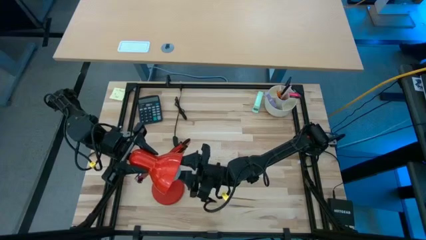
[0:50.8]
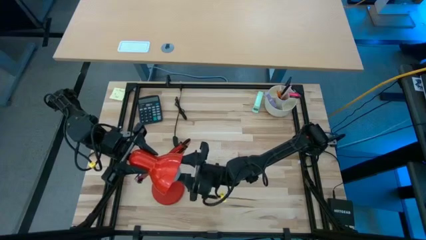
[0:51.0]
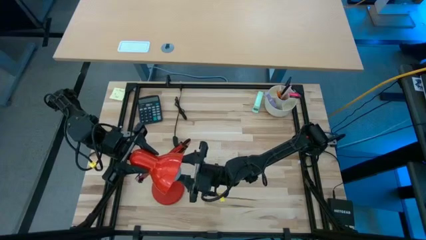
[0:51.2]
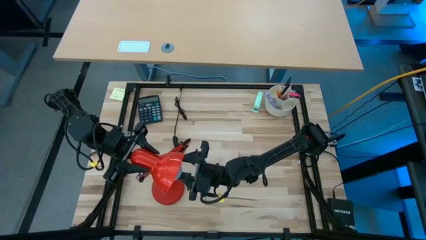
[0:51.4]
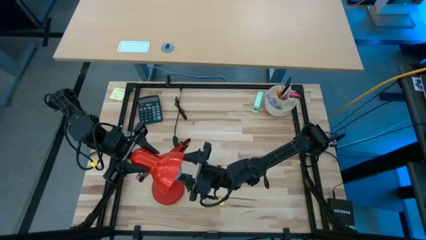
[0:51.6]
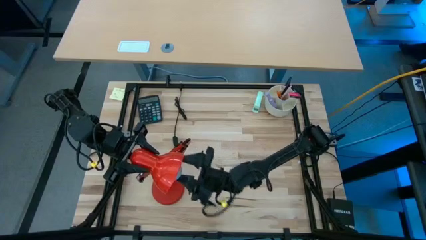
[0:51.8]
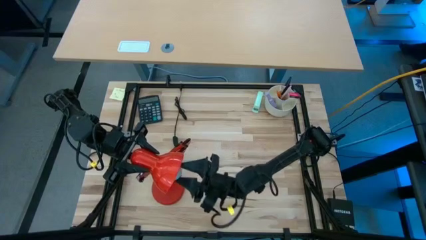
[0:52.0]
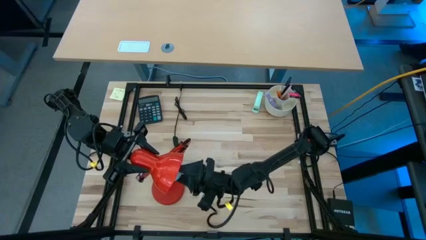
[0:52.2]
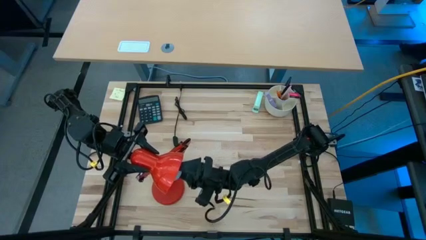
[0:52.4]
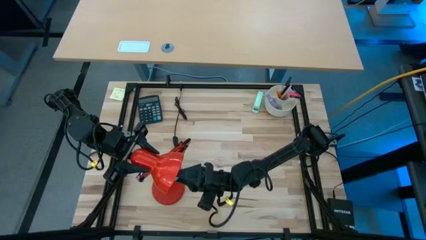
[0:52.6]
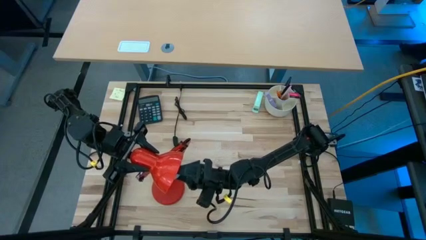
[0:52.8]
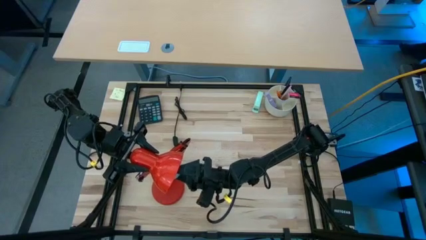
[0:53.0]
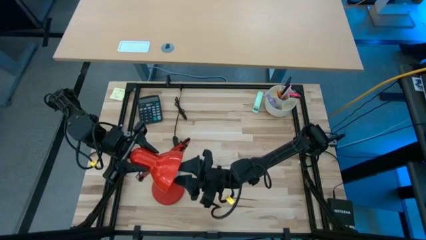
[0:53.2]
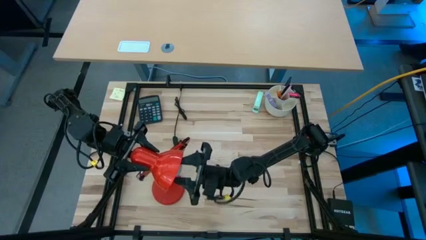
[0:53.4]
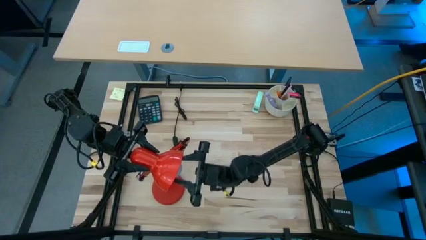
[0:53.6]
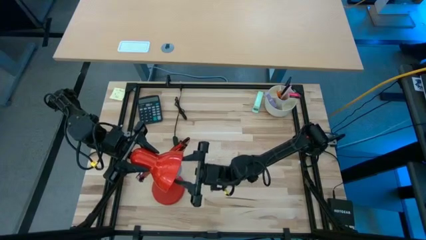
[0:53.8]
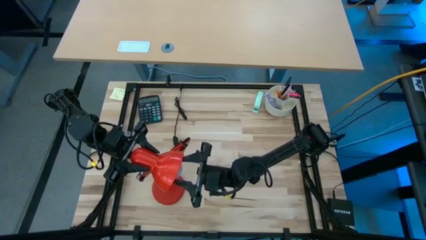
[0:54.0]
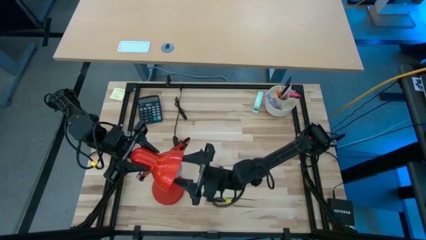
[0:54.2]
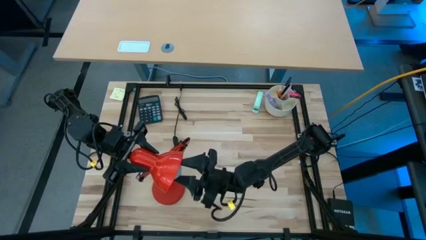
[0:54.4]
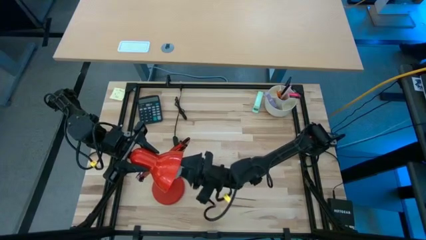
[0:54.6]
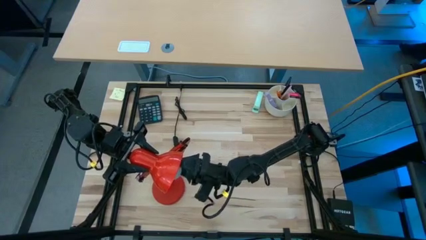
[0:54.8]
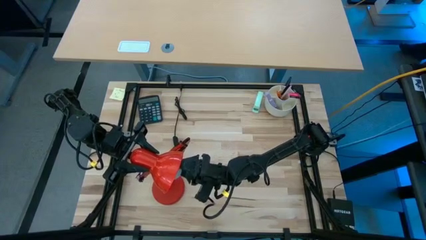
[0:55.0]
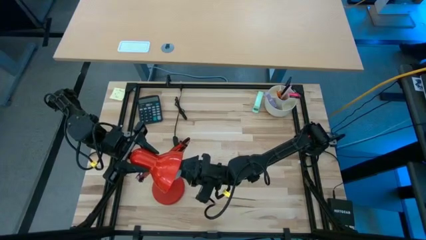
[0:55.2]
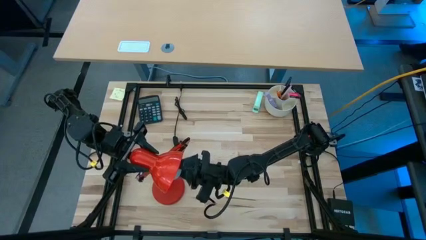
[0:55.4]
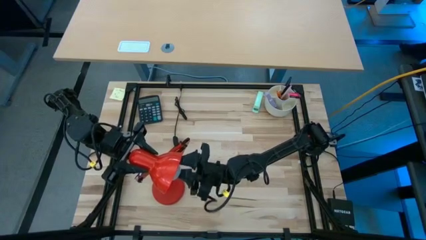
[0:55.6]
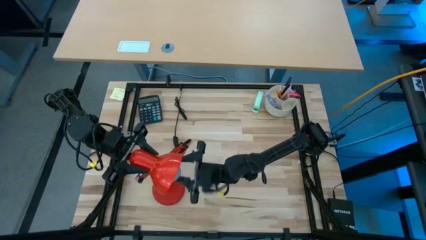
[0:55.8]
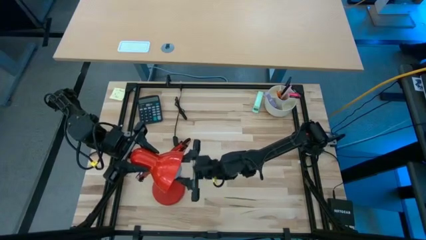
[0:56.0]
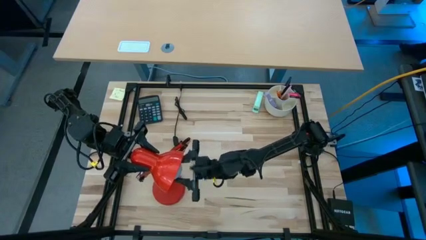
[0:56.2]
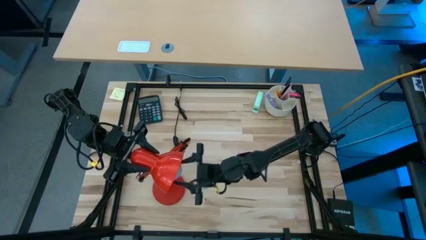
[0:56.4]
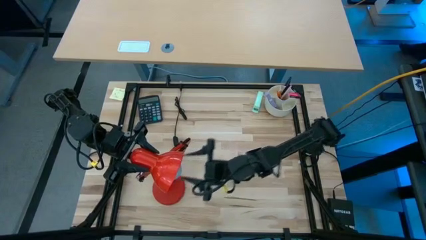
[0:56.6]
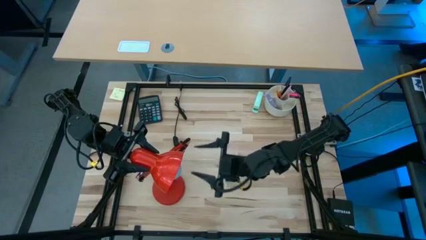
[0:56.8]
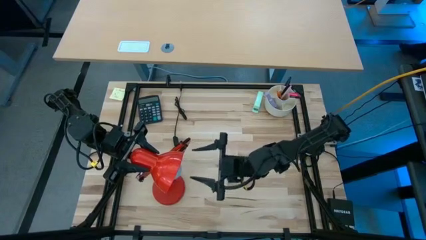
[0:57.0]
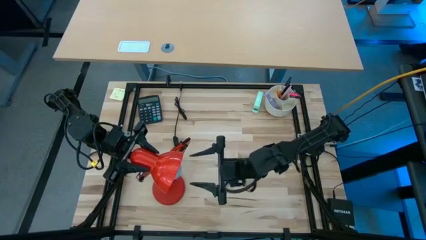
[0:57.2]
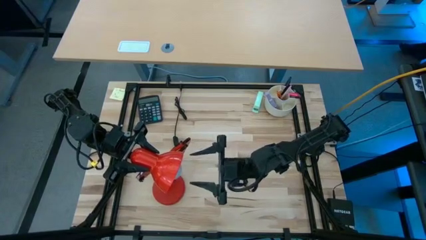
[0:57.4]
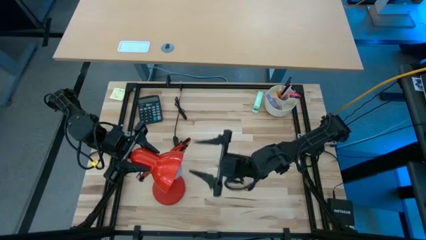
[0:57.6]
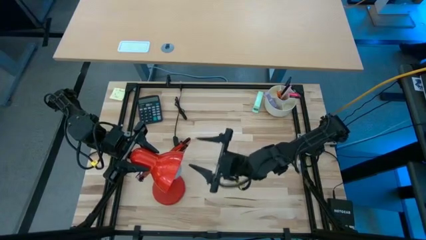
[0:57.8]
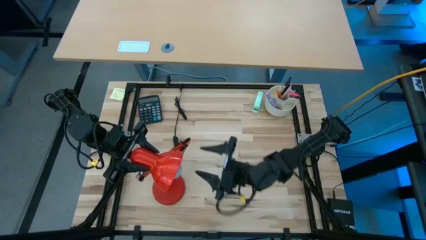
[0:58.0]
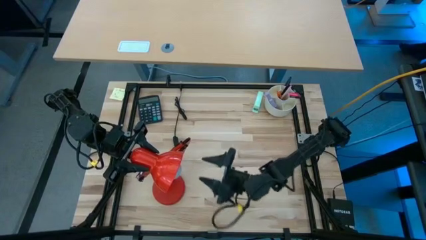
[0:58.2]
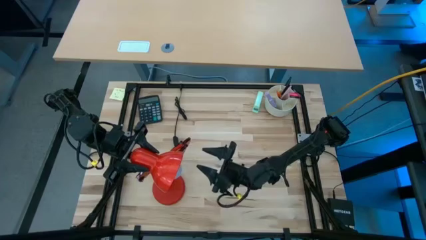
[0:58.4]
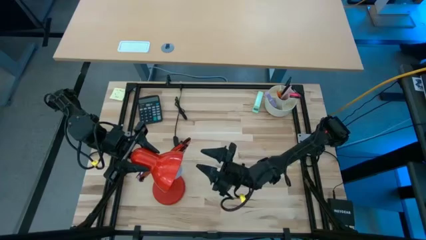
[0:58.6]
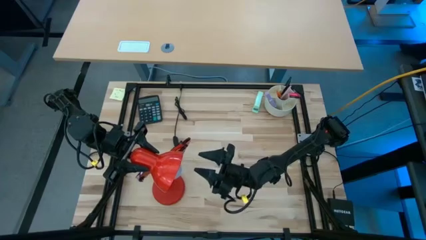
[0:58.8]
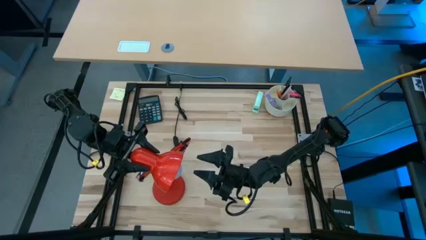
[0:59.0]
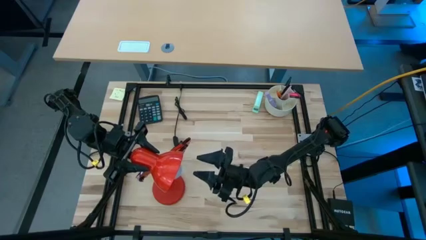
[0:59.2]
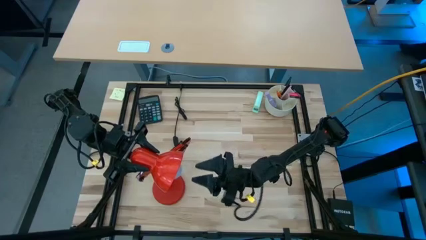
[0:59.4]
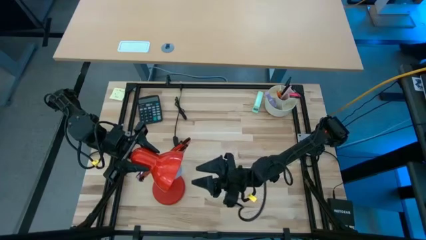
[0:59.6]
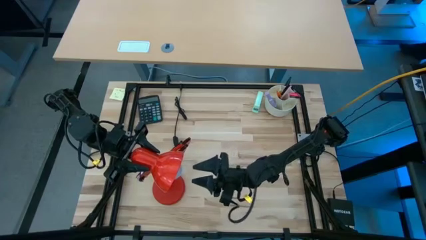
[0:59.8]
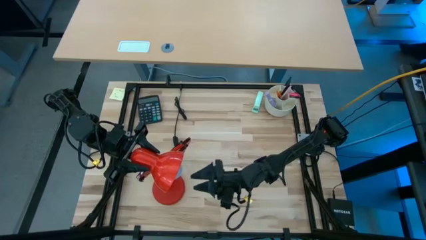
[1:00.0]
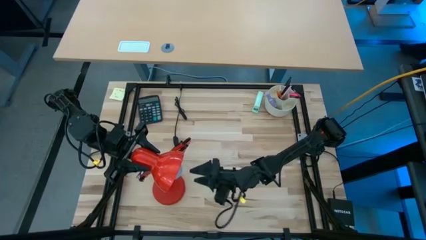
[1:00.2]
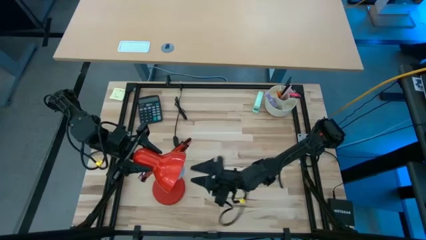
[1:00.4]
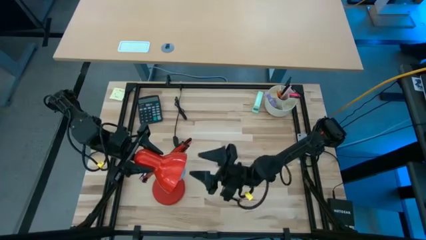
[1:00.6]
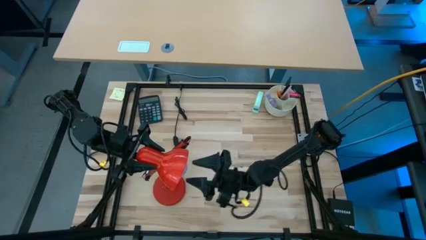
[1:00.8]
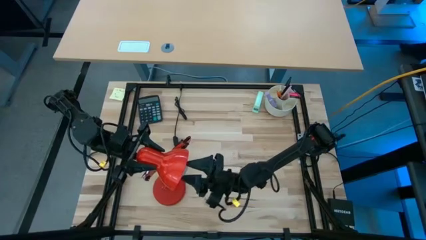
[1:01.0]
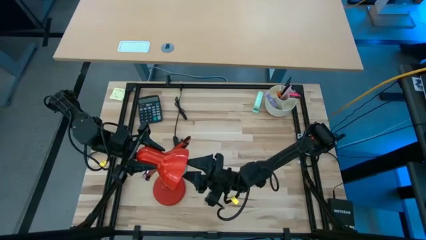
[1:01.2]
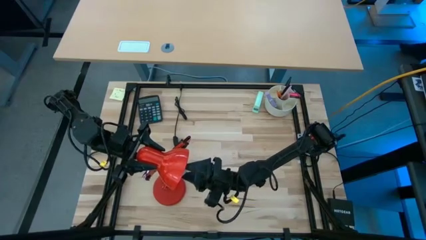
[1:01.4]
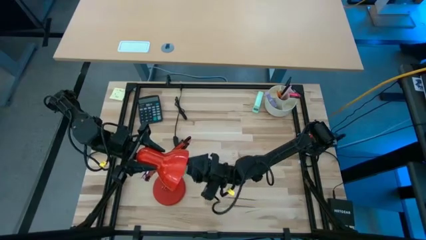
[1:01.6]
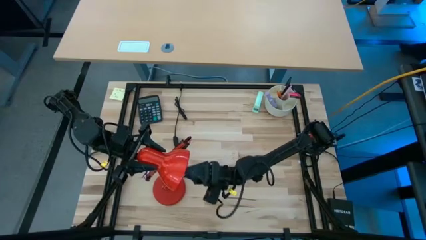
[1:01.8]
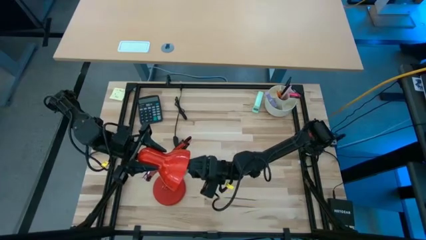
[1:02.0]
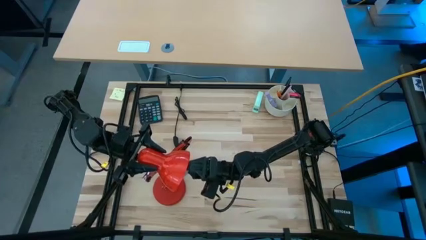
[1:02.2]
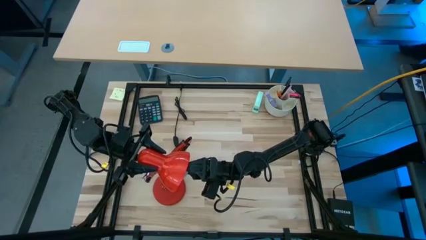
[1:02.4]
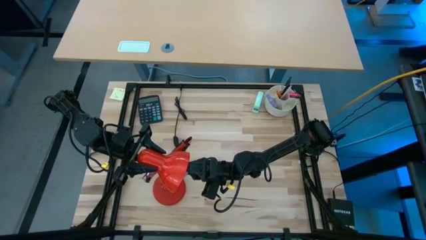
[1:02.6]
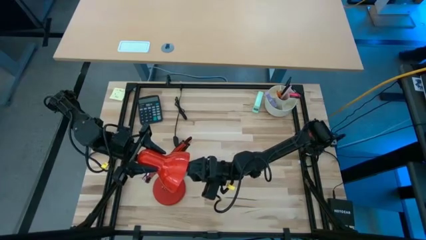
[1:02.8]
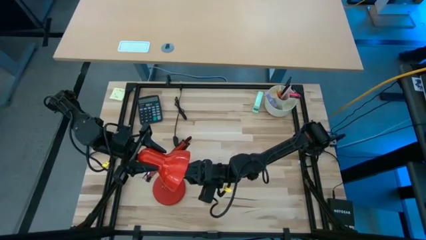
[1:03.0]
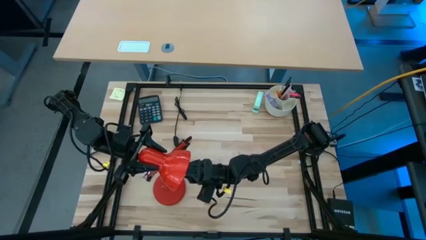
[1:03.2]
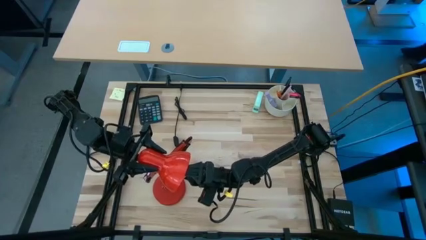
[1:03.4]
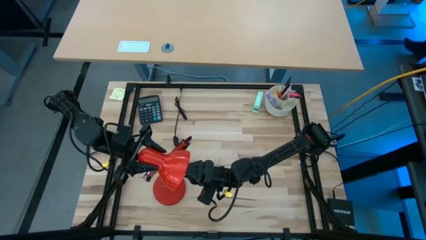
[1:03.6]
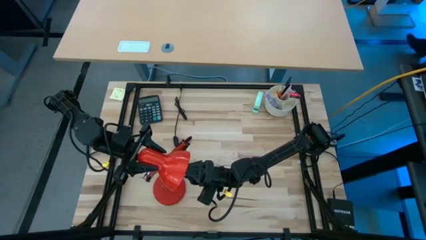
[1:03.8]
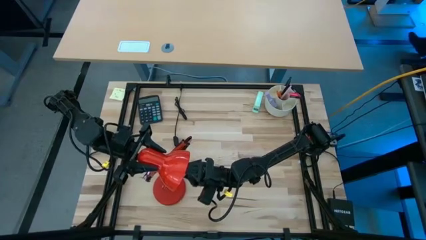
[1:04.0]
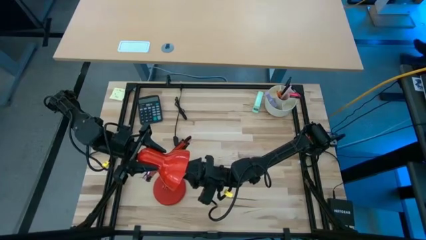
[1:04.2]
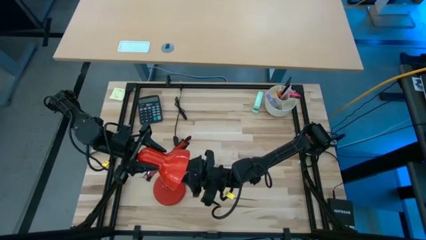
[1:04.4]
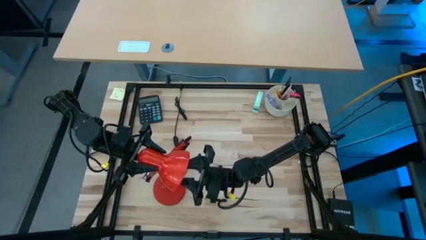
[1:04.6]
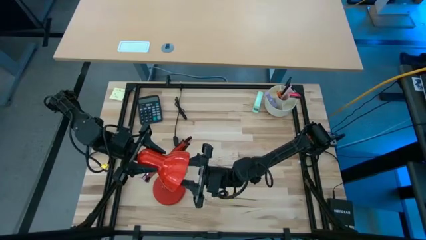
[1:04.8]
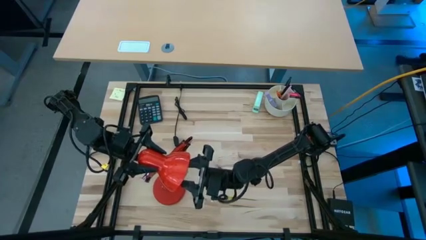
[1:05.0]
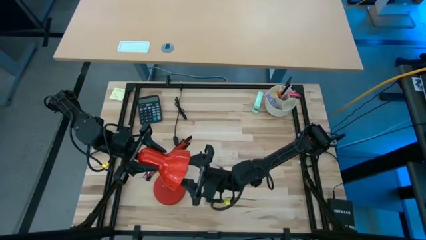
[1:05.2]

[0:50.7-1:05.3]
Task: Screw lightbulb
Insert the light bulb into the orange desk lamp

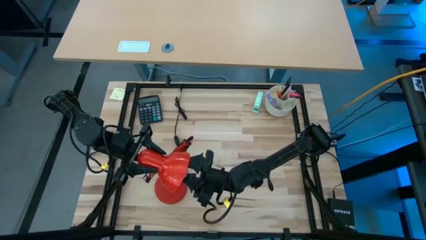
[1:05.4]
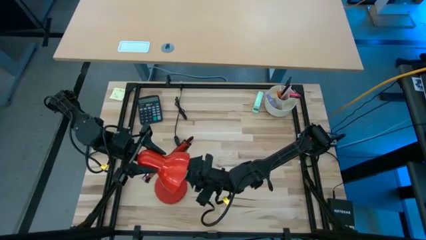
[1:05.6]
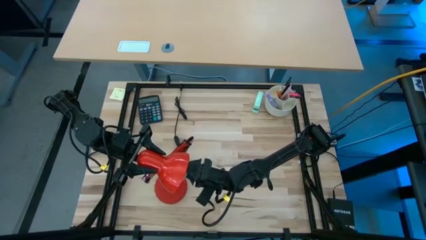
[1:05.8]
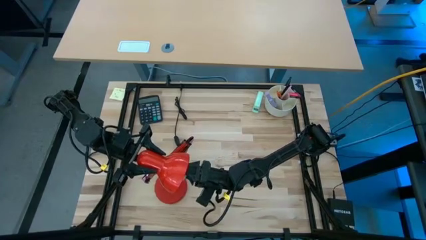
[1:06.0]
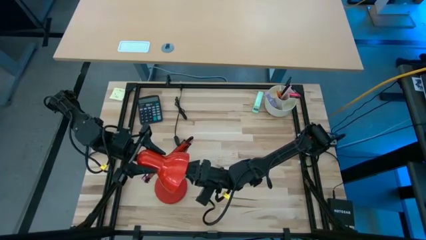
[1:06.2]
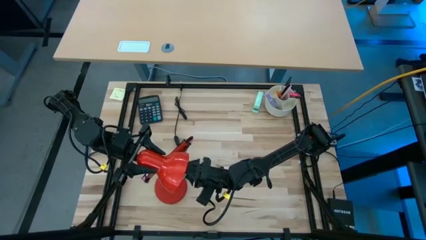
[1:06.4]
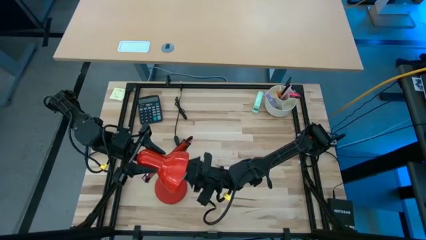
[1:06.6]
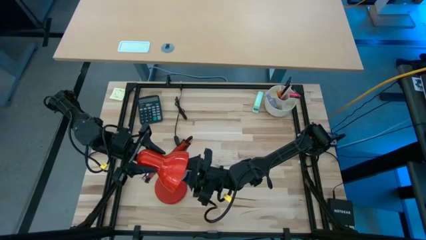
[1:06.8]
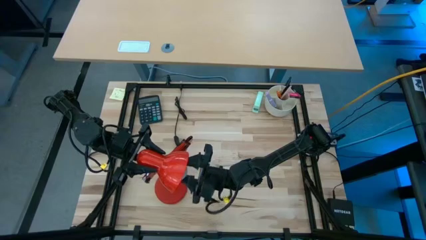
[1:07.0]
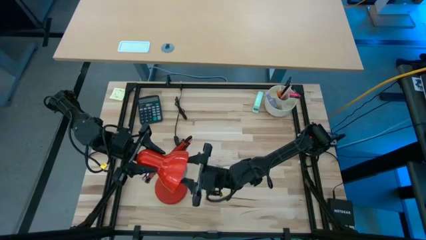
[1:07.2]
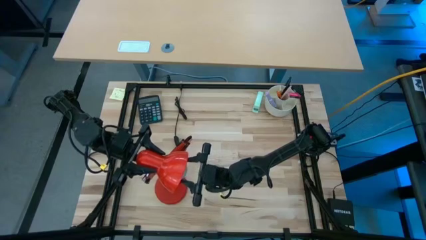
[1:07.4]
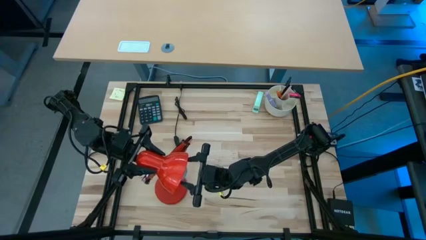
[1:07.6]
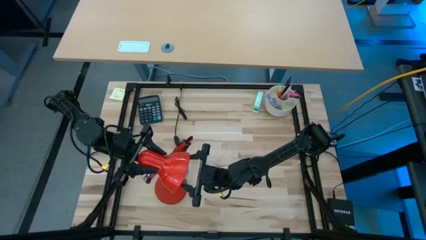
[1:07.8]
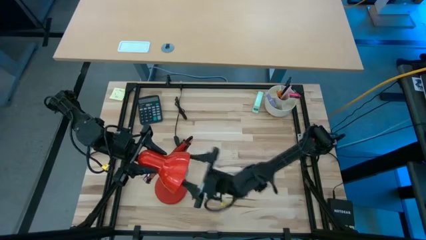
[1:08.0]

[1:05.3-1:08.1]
Insert the light bulb into the orange desk lamp
